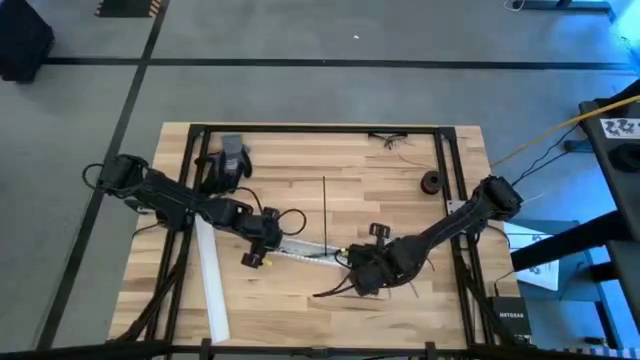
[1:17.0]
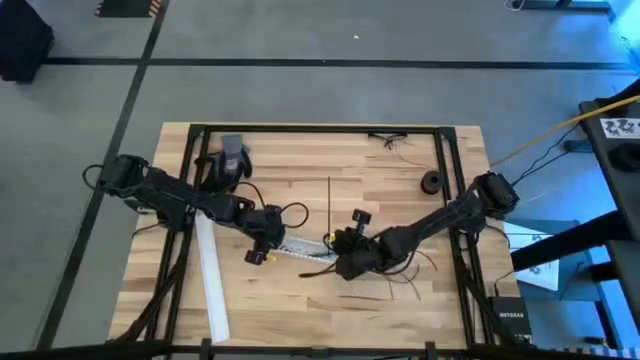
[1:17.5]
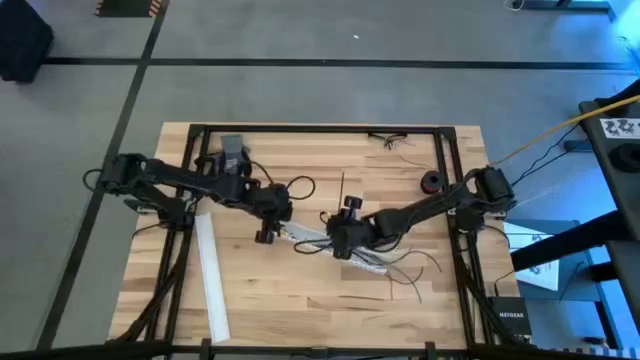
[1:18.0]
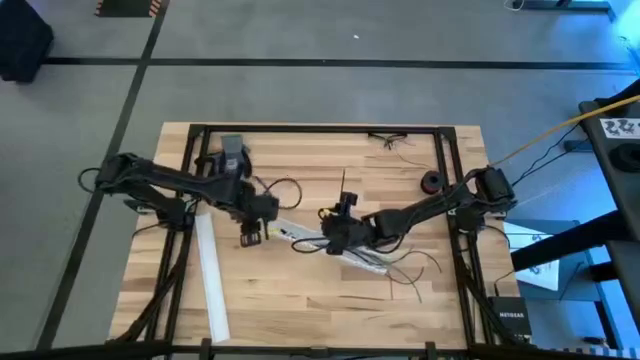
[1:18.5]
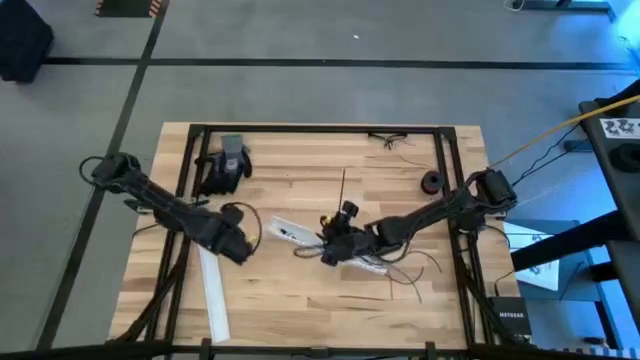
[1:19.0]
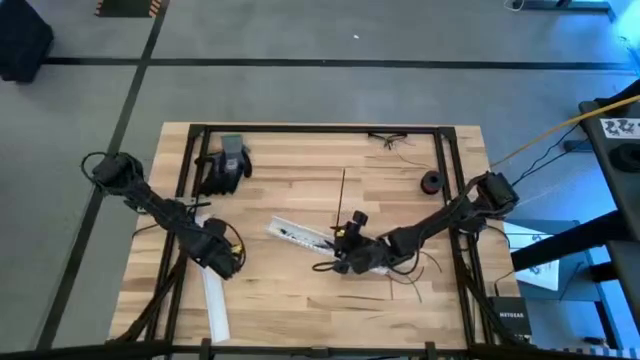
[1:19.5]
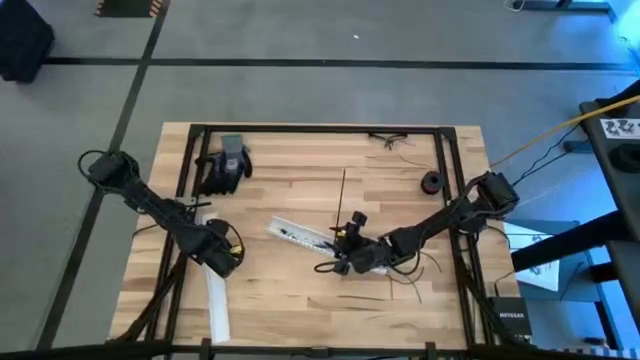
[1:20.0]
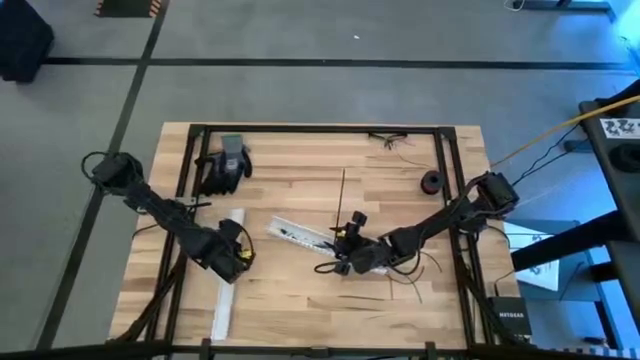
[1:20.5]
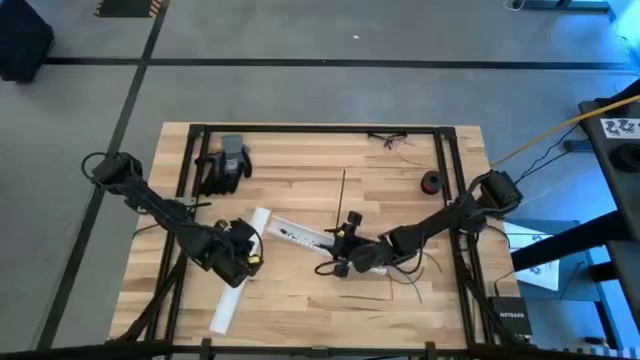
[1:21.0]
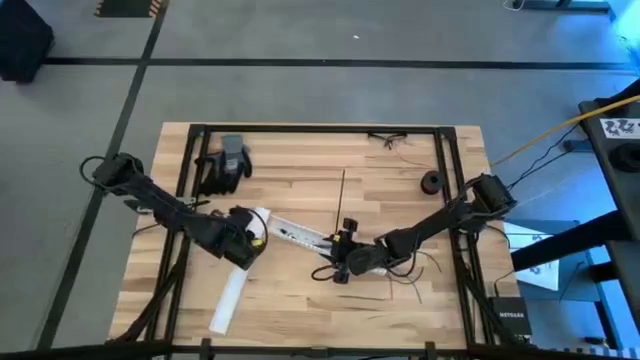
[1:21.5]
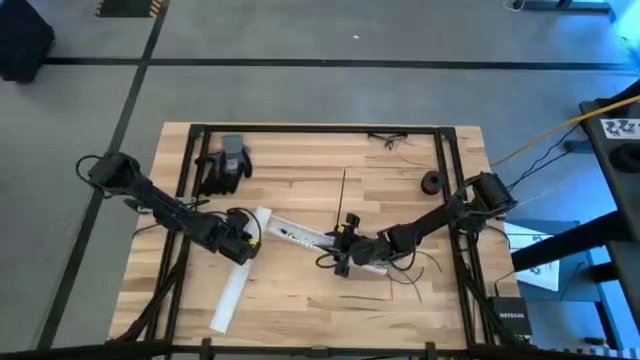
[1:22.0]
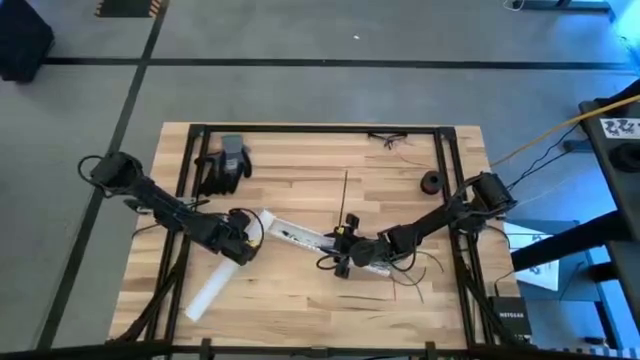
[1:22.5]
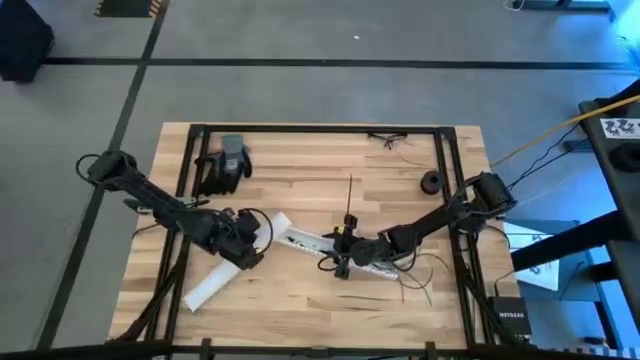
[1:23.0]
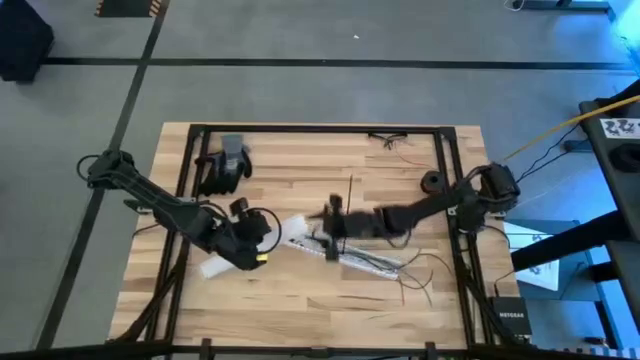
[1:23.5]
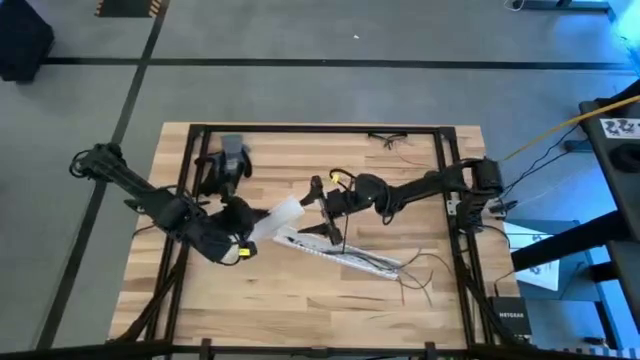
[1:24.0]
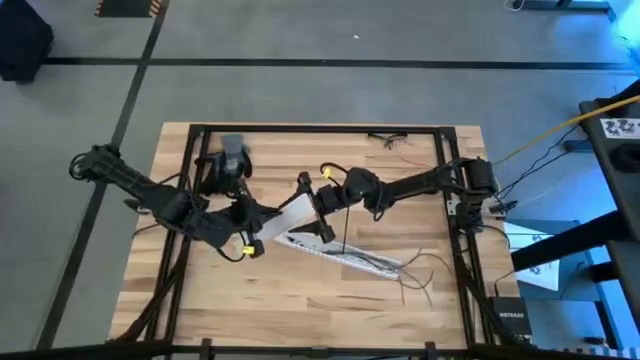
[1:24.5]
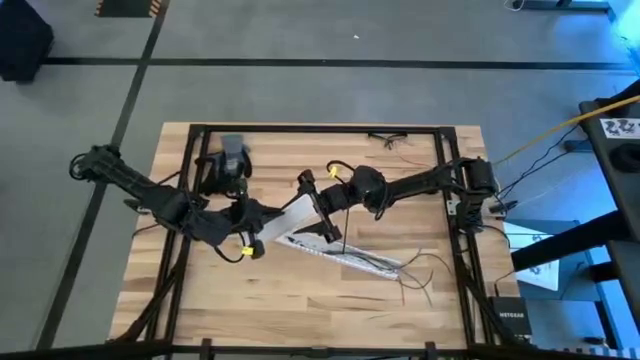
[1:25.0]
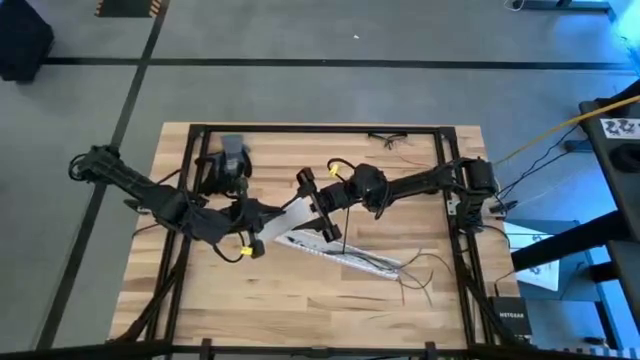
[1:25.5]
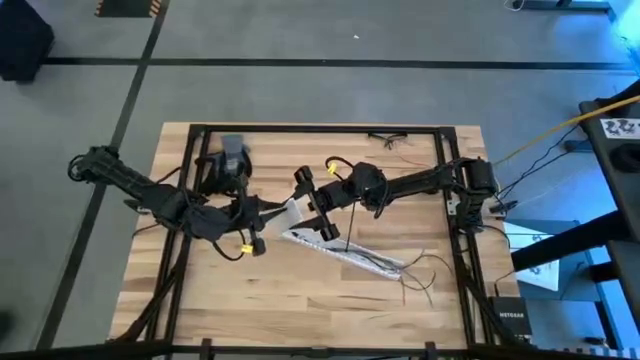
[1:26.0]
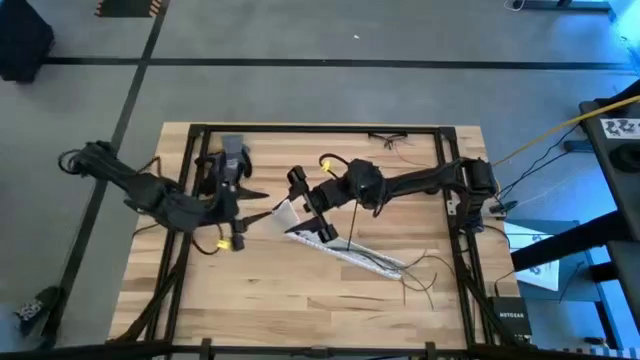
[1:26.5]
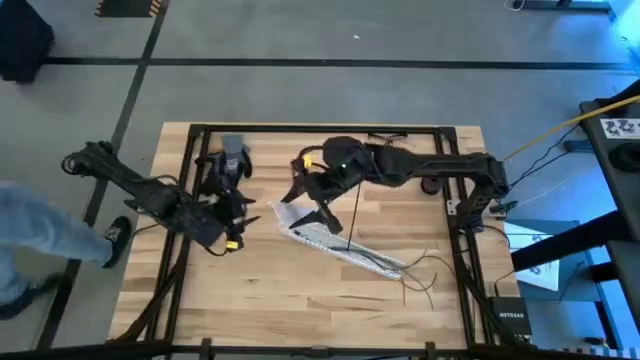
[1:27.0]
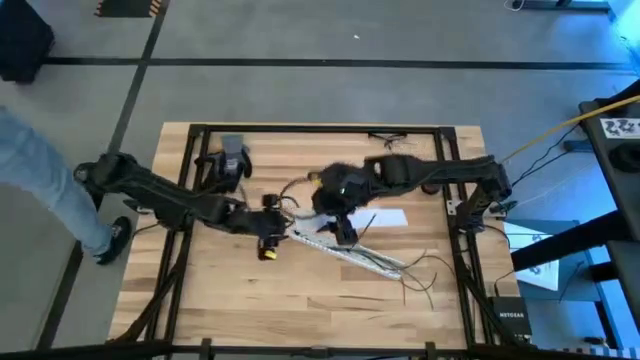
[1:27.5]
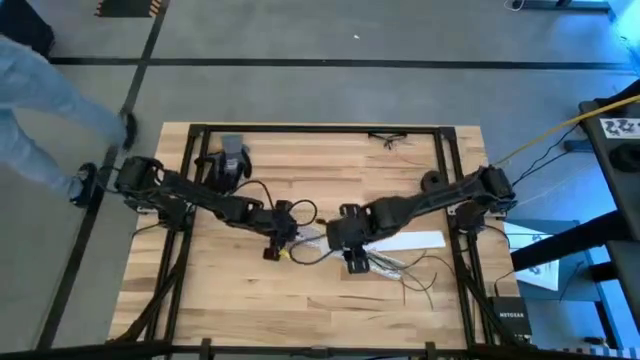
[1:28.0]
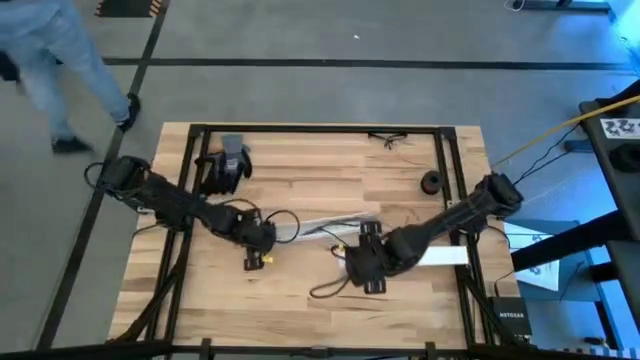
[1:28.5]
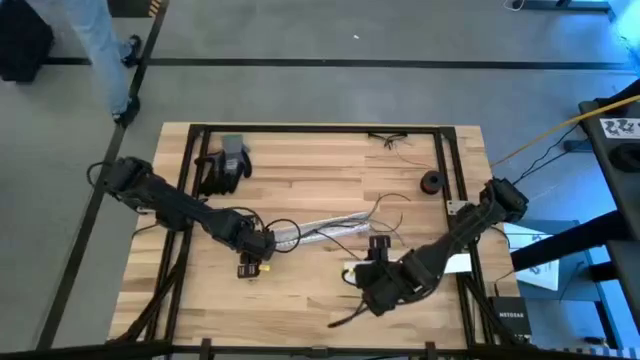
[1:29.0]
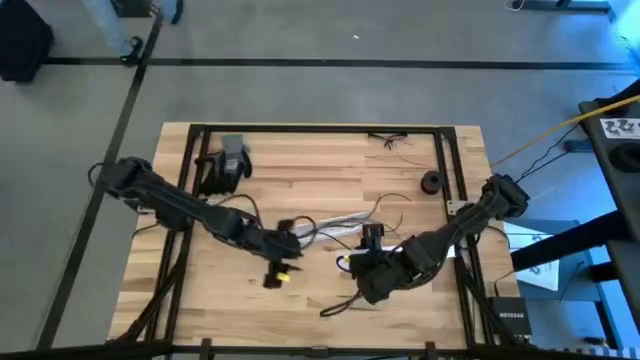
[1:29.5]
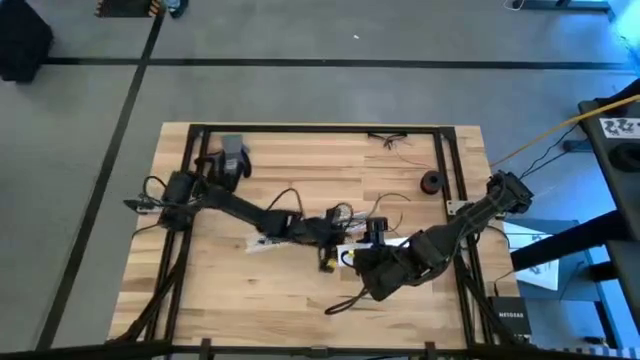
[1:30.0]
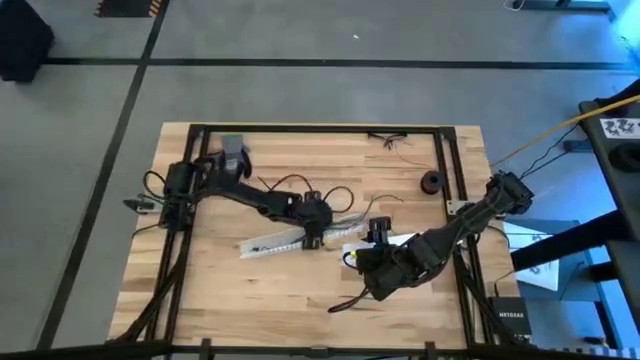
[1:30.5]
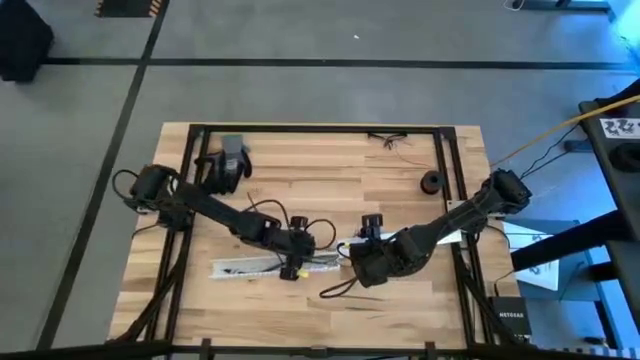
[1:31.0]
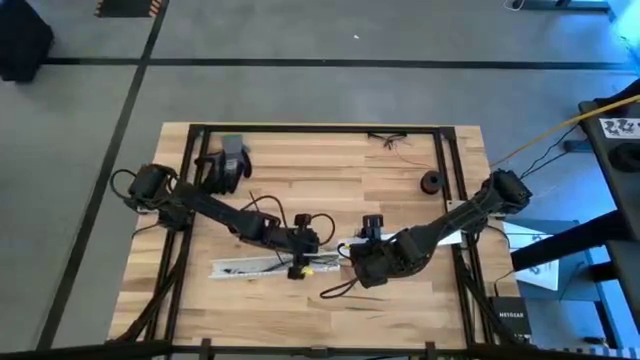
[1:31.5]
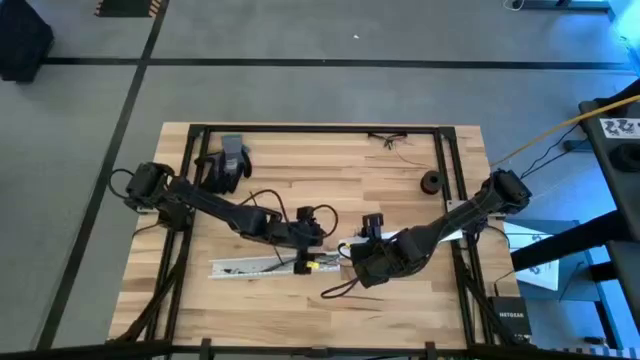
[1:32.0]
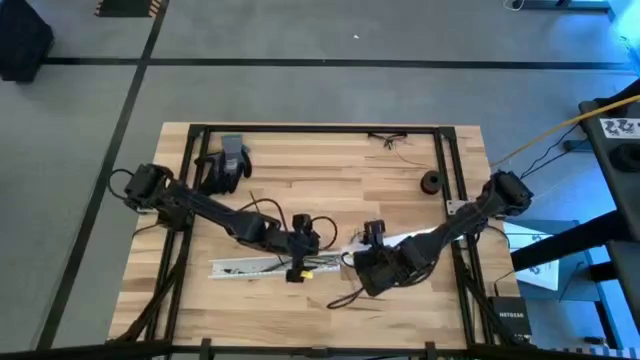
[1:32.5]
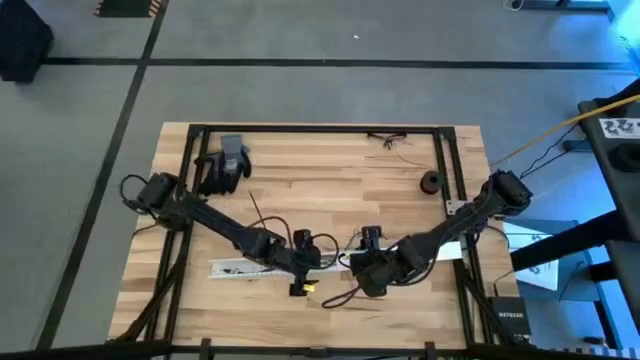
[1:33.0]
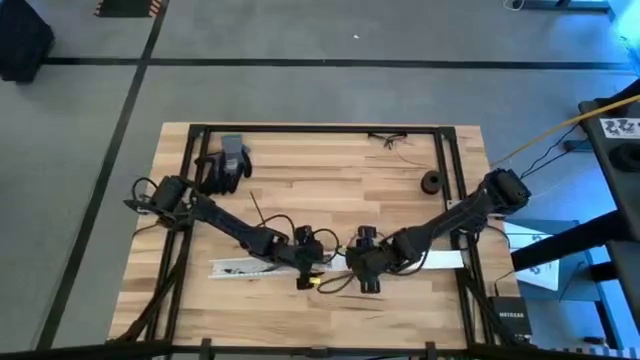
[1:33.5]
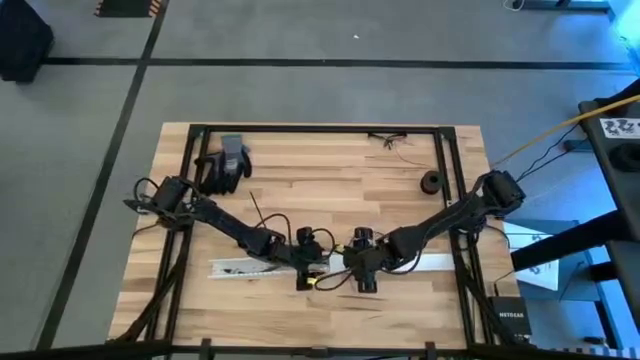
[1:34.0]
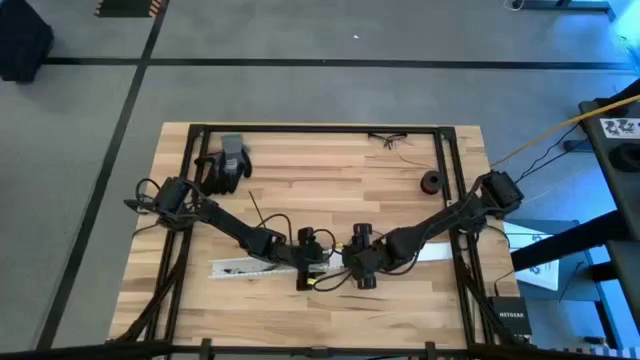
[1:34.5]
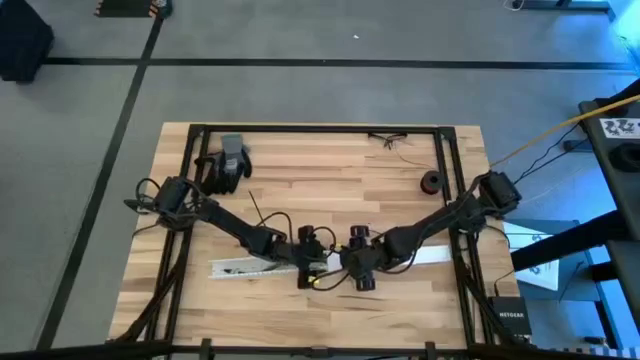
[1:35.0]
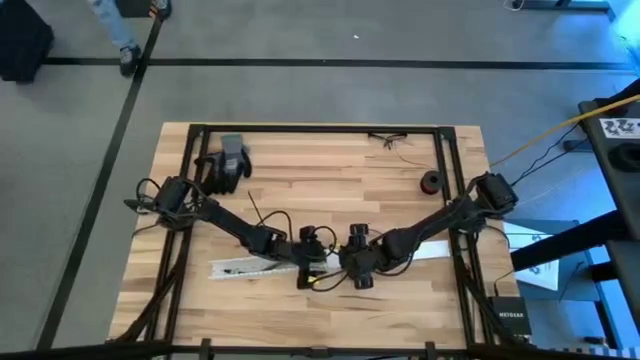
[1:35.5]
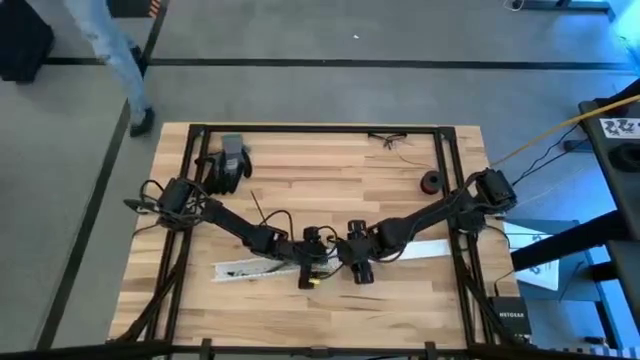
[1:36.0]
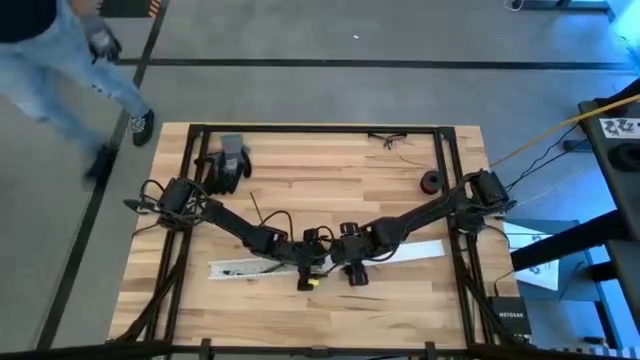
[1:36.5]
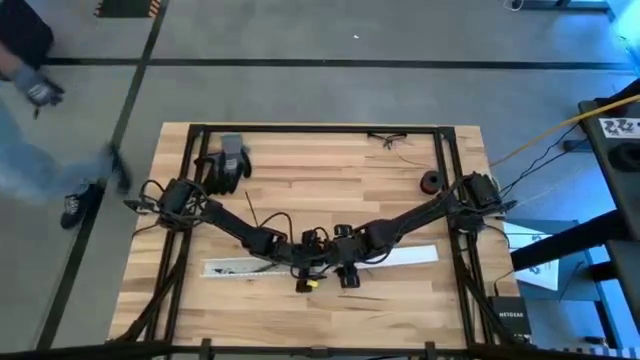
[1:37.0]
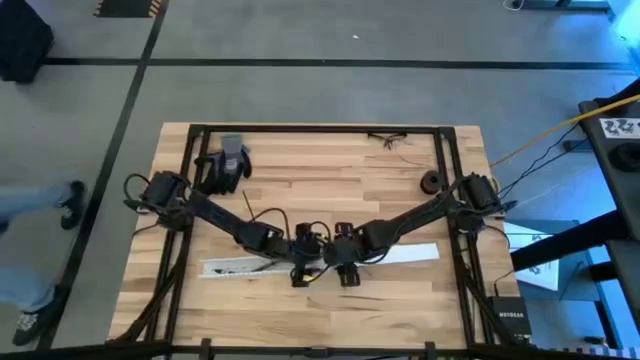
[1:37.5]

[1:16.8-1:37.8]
Task: Ziptie cables
Close the white cable duct

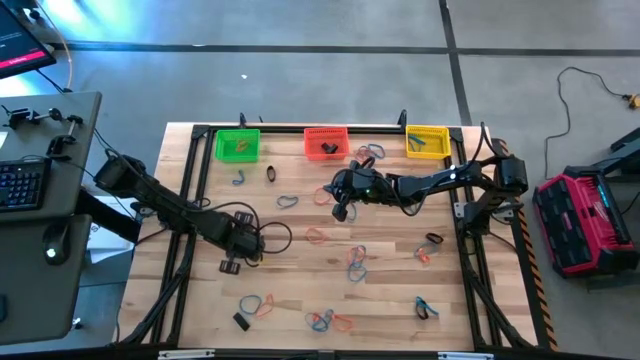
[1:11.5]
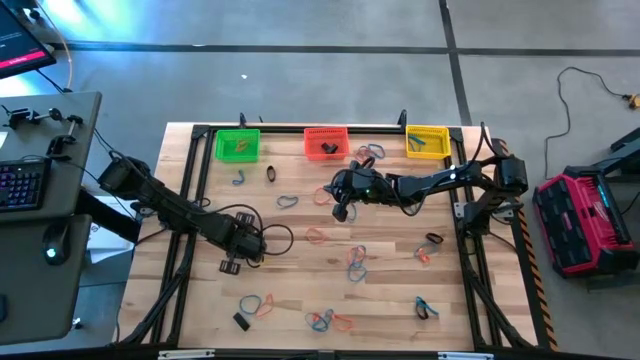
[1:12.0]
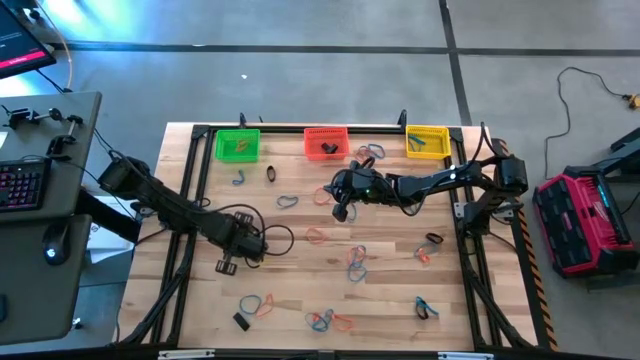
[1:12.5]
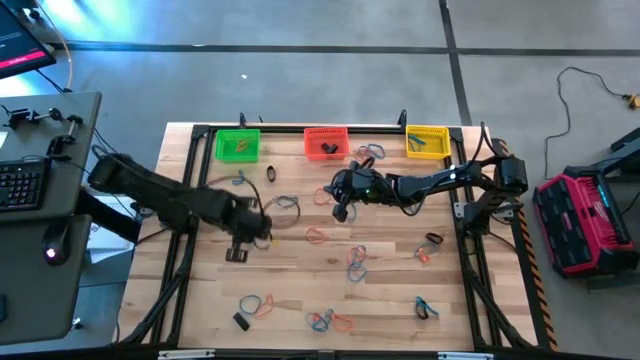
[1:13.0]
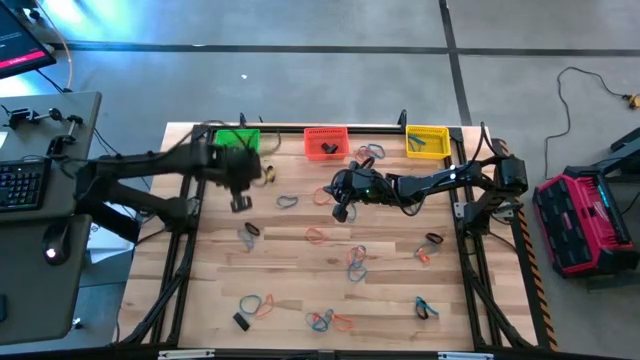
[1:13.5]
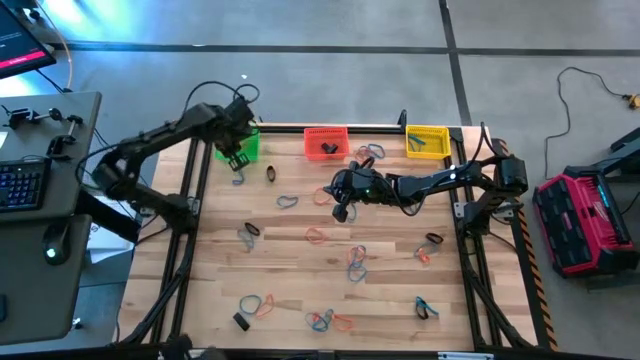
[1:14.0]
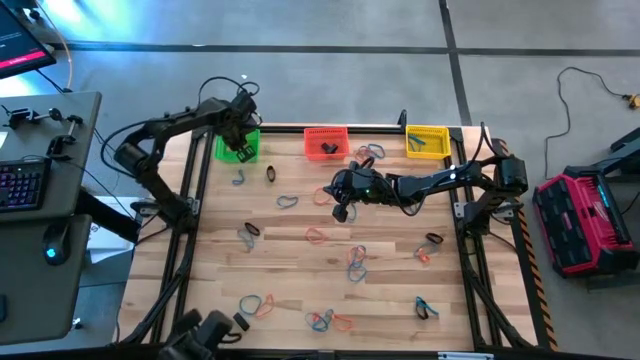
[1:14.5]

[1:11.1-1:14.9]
Task: Sort rubber bands into baskets
Put the orange rubber band into the green bin
